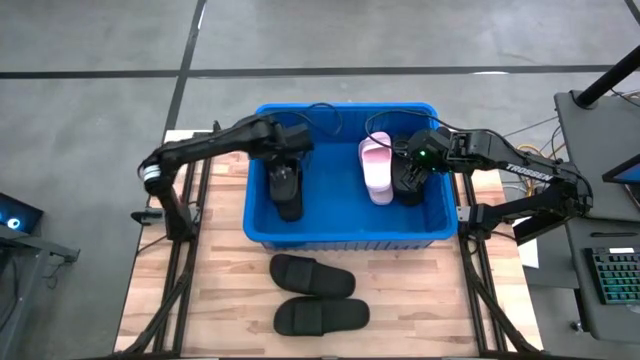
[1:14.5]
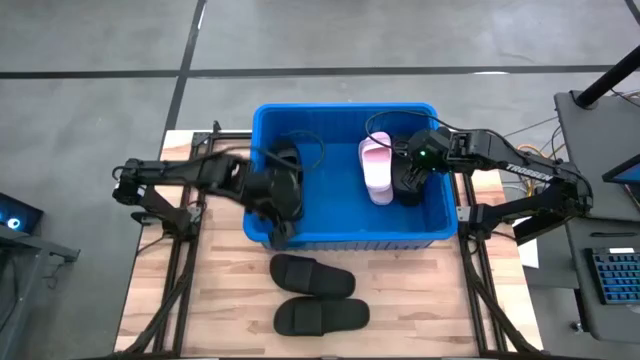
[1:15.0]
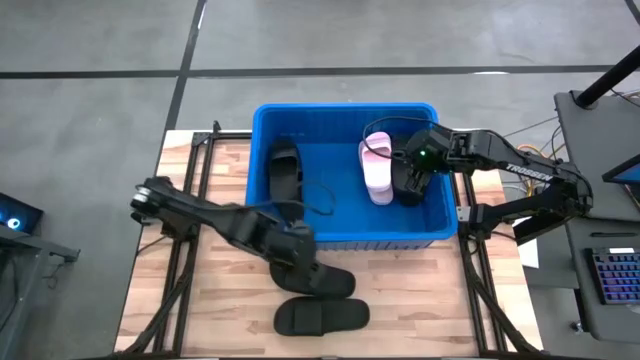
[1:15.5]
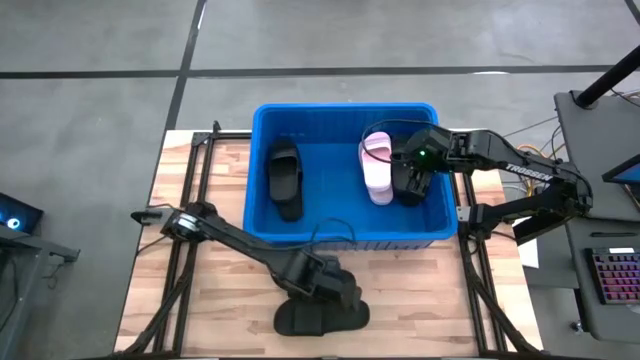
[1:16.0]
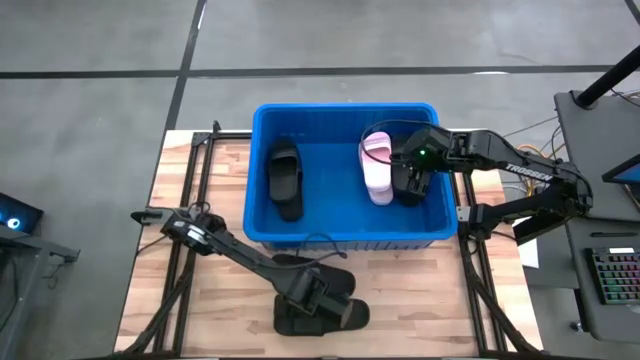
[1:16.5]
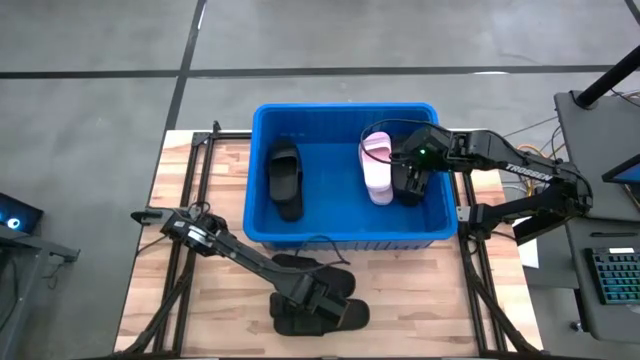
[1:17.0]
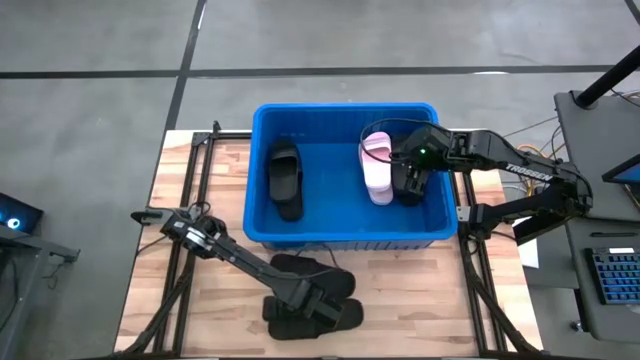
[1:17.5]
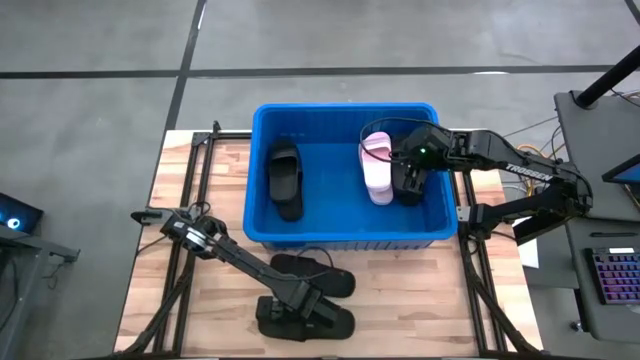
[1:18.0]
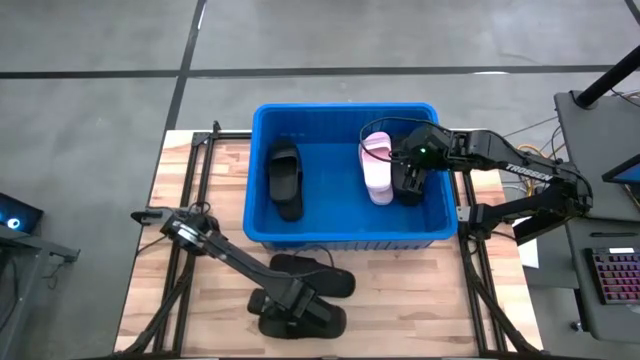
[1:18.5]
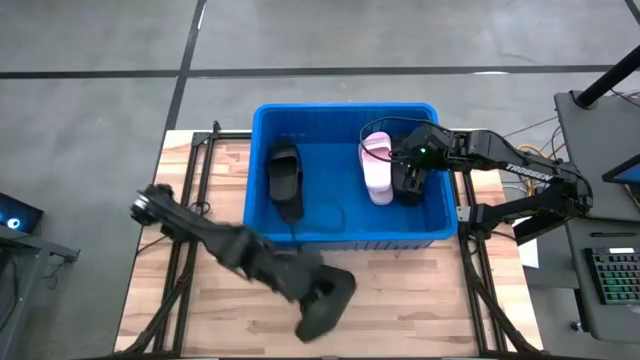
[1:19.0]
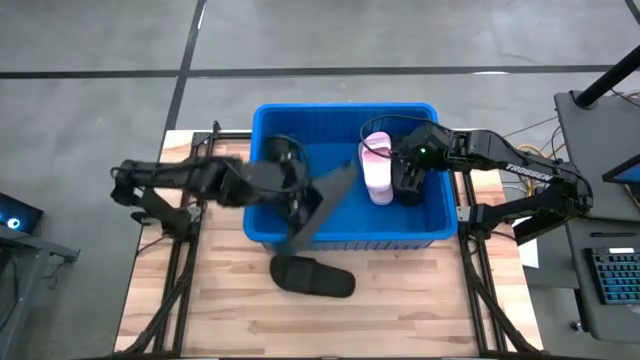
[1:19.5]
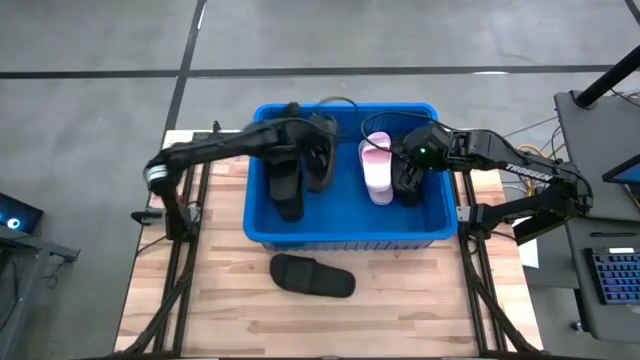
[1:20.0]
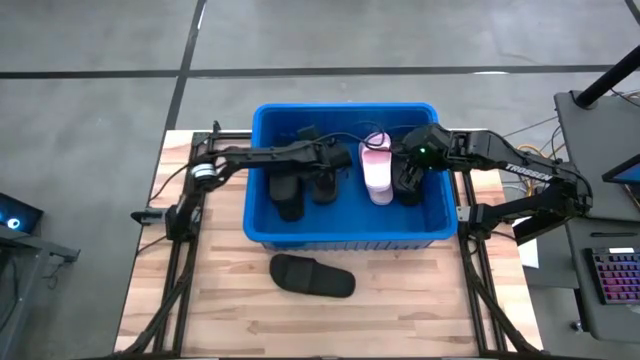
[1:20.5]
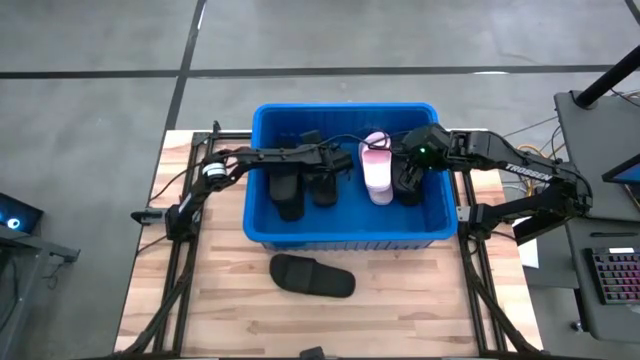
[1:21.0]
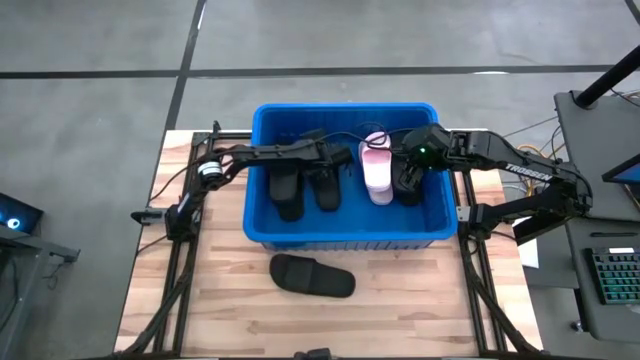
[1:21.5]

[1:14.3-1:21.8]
Task: Pick and place slides into bin
Put the black slide into the blue container

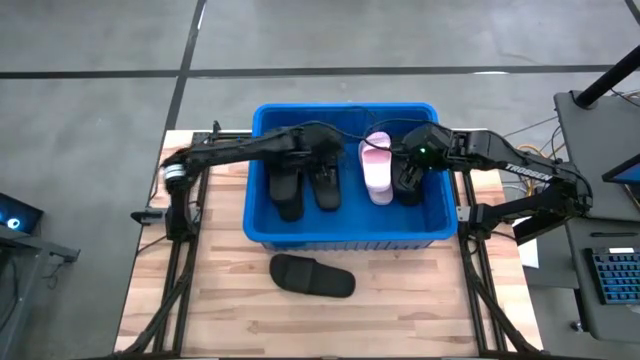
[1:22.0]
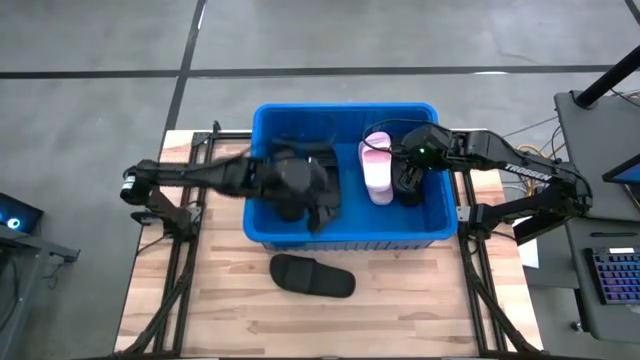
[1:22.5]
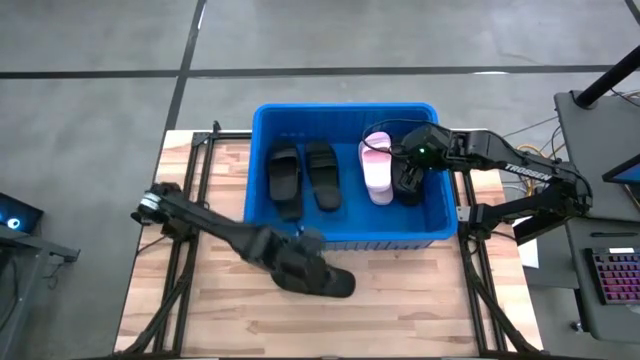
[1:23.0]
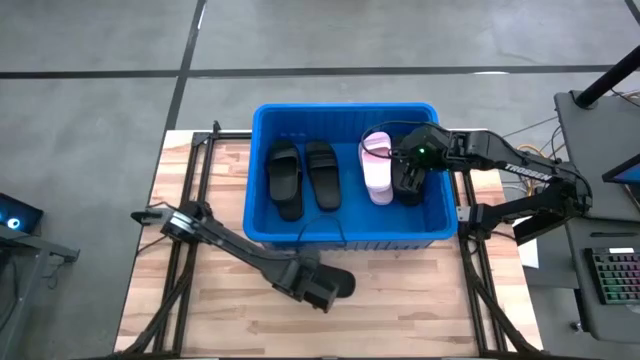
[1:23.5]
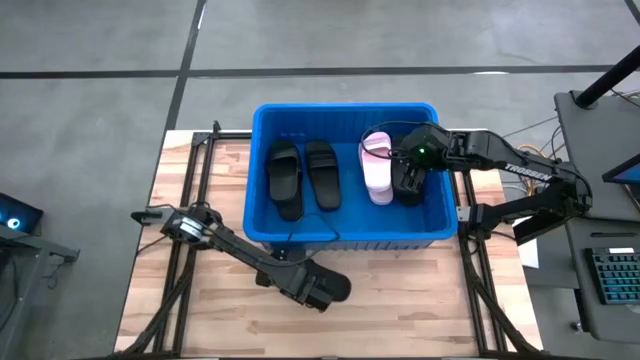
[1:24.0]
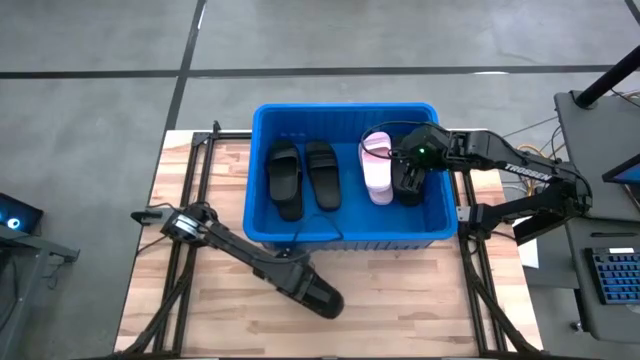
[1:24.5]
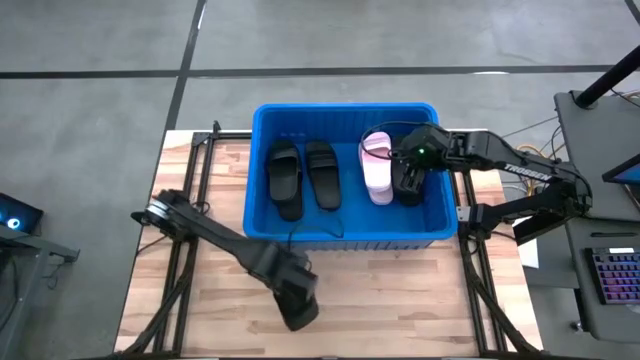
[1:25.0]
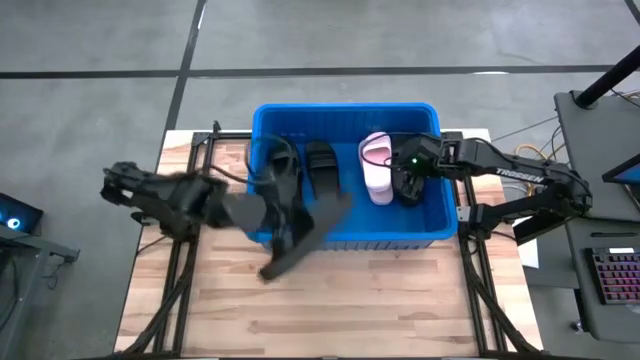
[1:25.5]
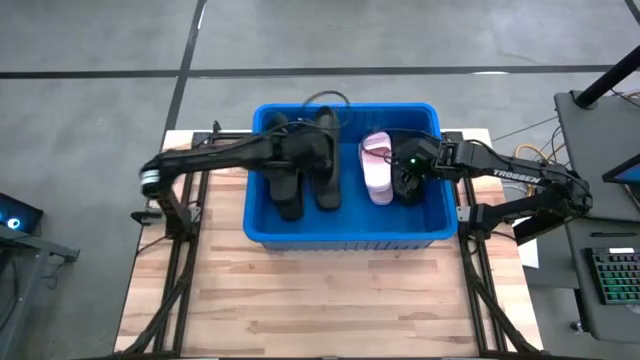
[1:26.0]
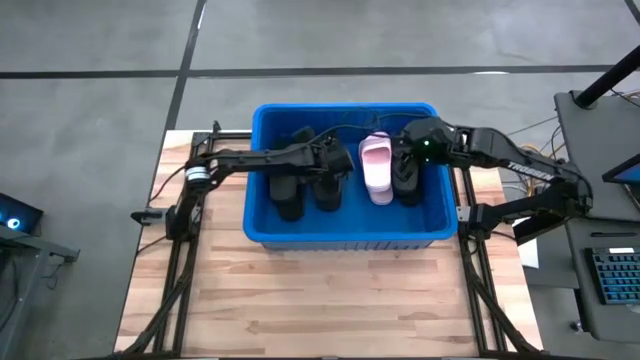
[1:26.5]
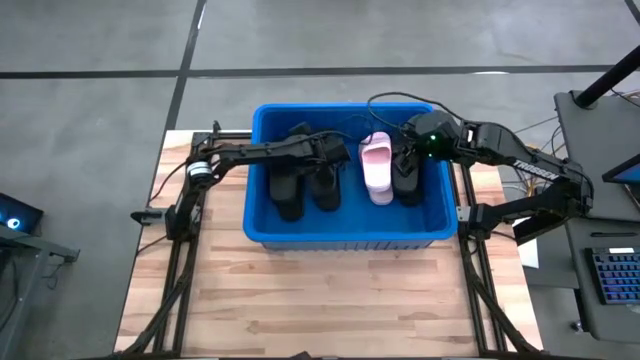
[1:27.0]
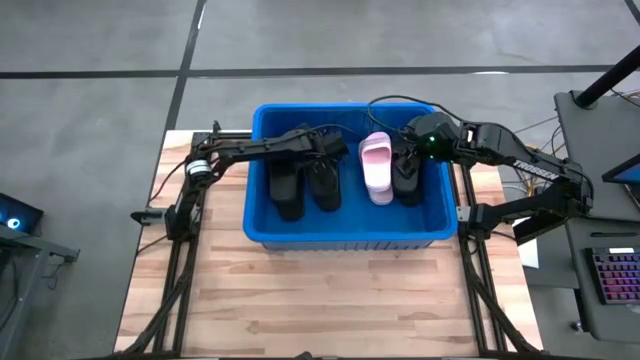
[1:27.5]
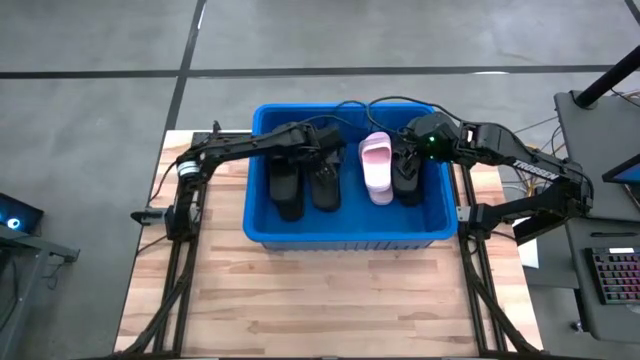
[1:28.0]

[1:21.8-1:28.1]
Put the black slide into the blue container

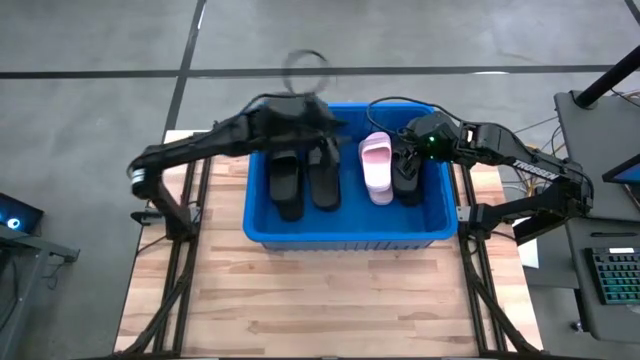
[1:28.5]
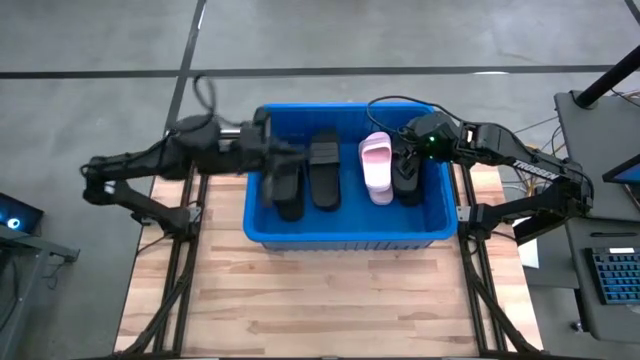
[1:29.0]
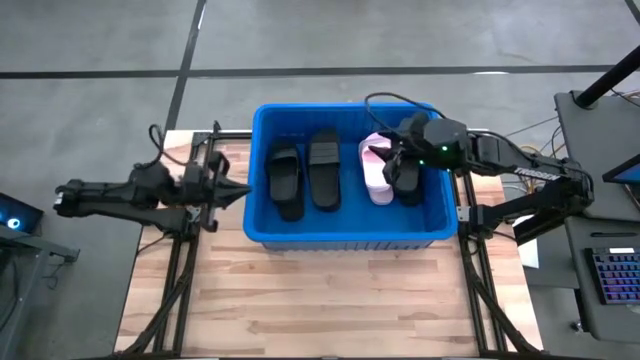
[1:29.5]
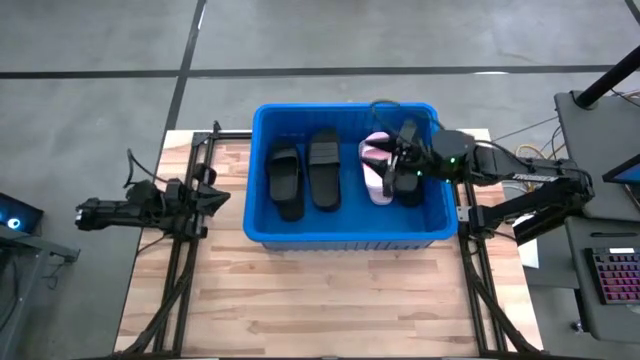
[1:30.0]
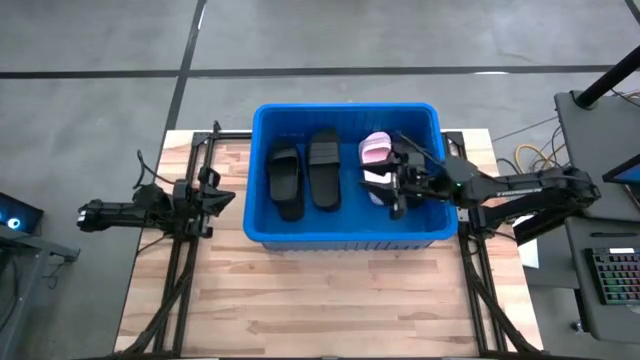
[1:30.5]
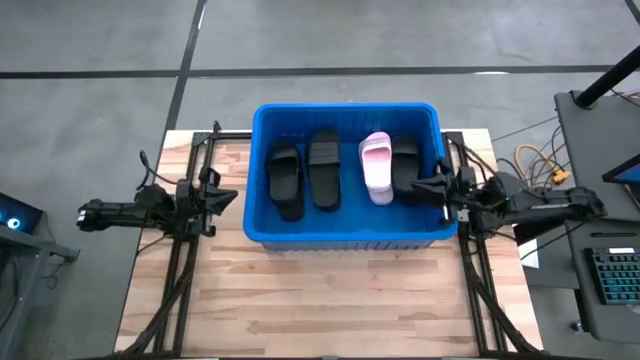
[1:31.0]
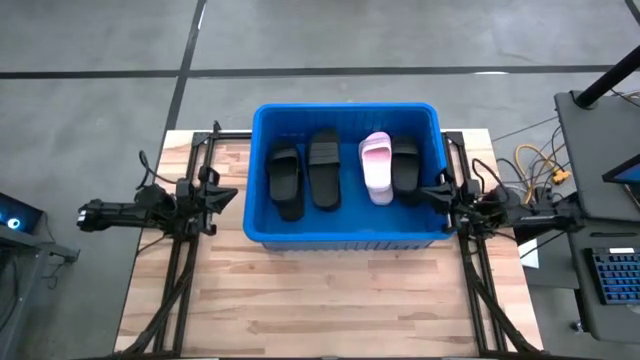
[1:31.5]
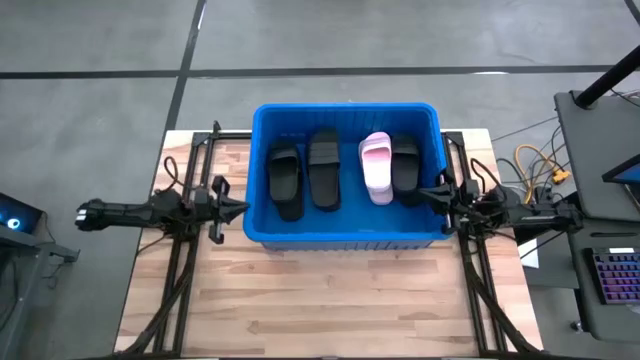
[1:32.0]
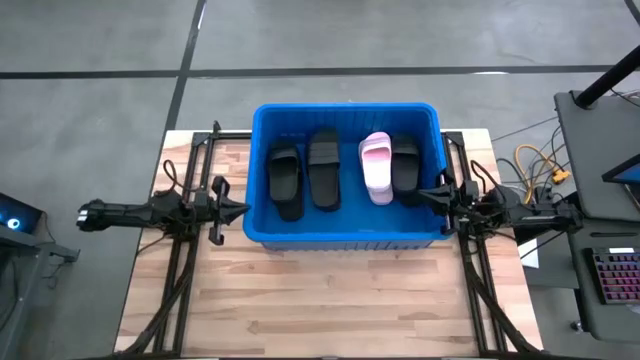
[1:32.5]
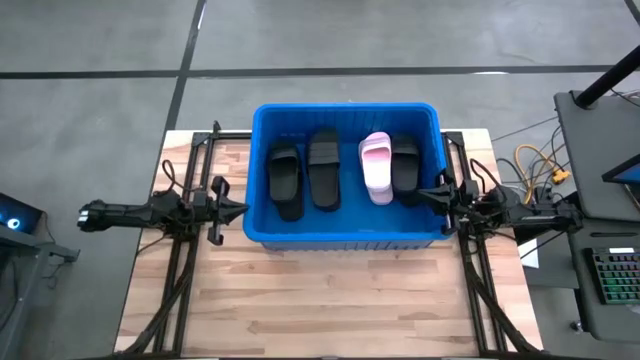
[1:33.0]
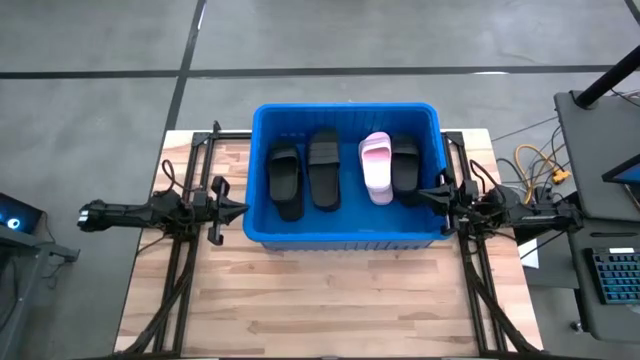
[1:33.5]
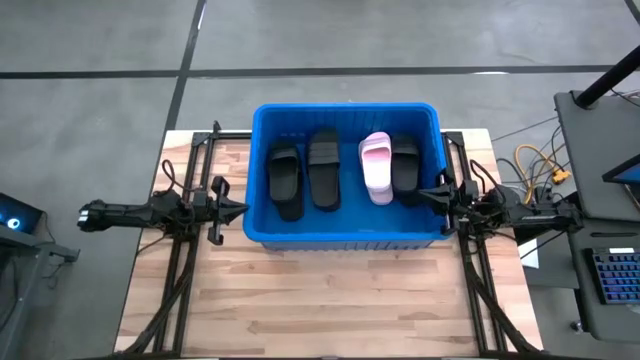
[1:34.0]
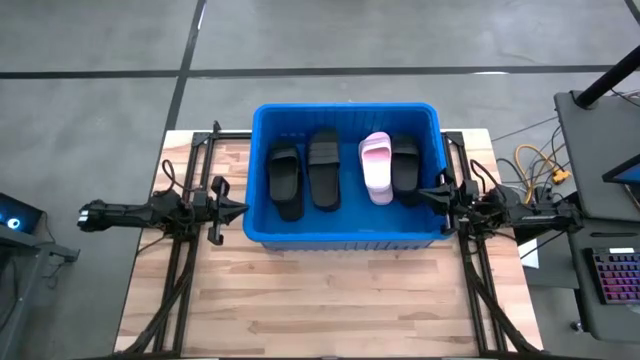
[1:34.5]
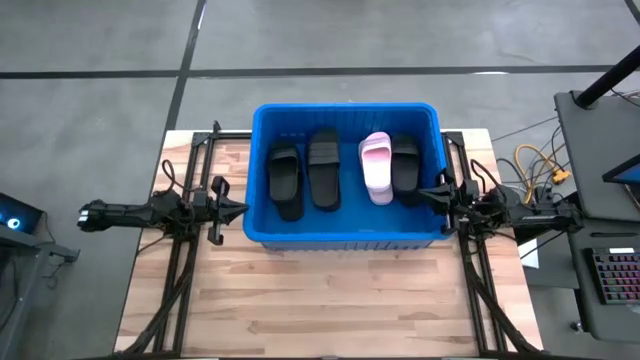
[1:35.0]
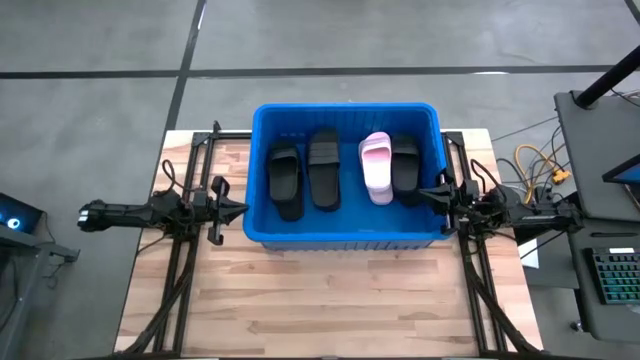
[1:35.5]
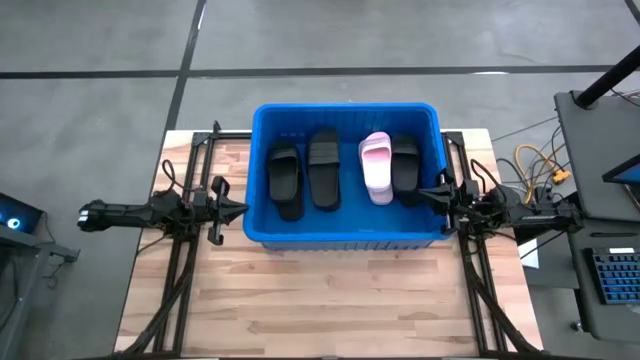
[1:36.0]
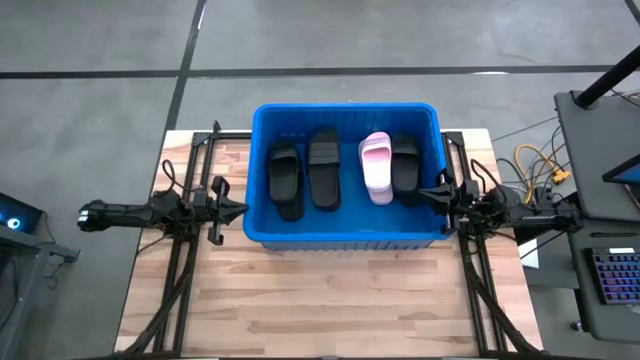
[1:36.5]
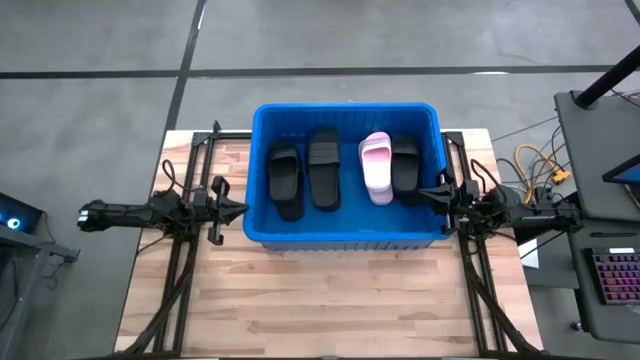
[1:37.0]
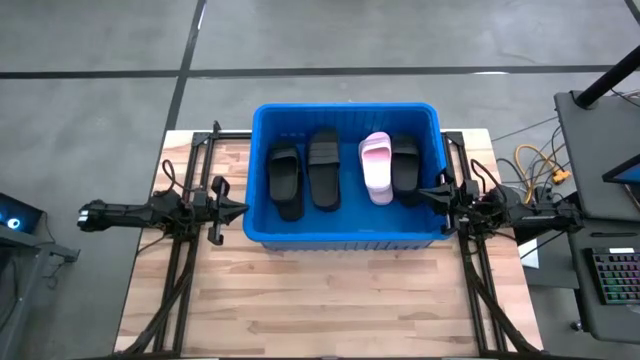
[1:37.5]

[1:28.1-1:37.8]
Return to Home Position
